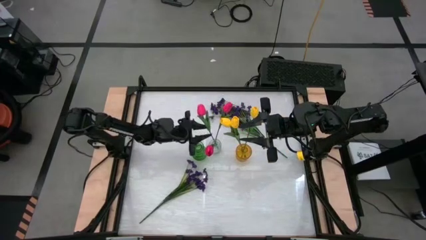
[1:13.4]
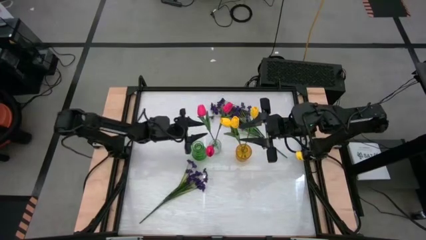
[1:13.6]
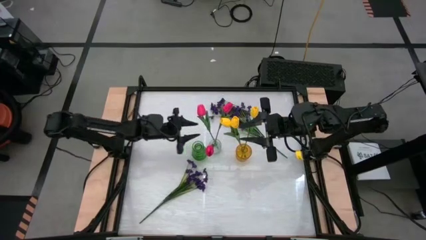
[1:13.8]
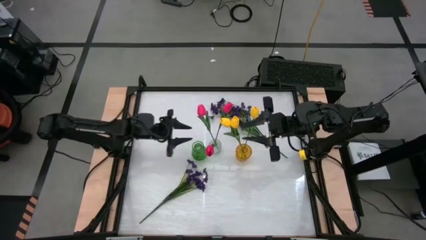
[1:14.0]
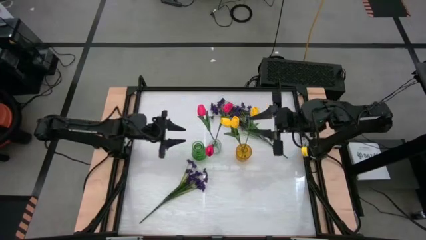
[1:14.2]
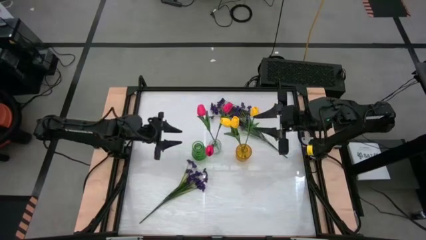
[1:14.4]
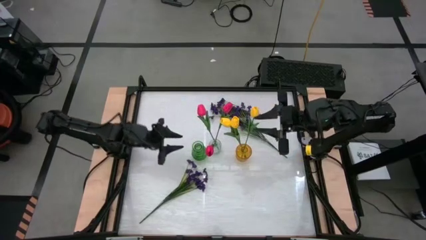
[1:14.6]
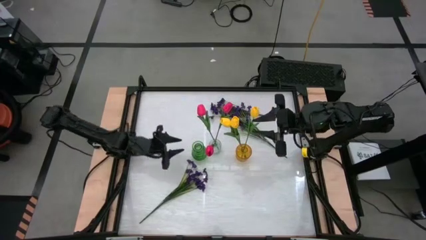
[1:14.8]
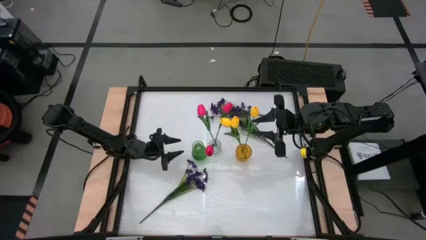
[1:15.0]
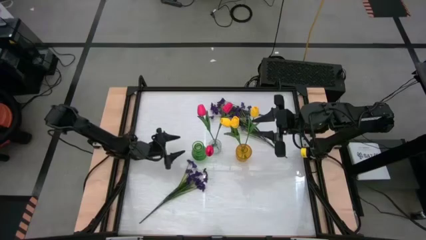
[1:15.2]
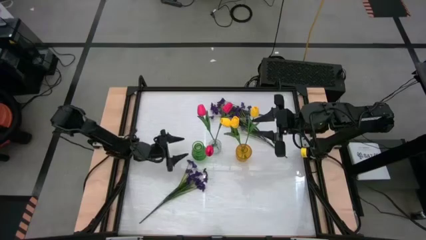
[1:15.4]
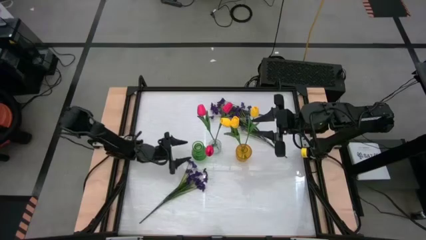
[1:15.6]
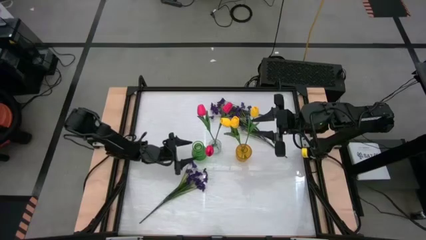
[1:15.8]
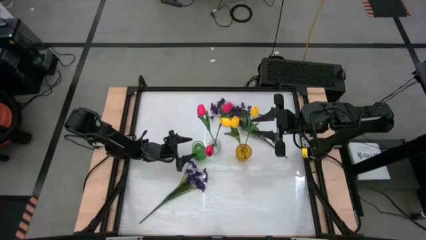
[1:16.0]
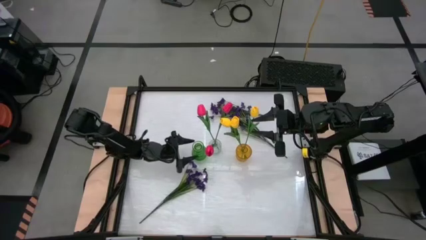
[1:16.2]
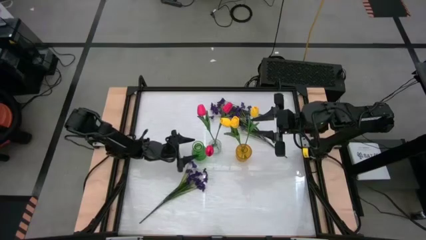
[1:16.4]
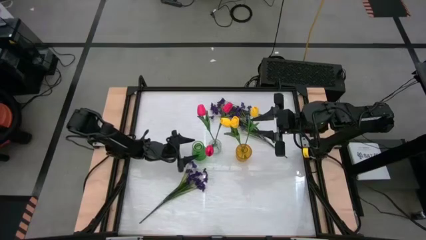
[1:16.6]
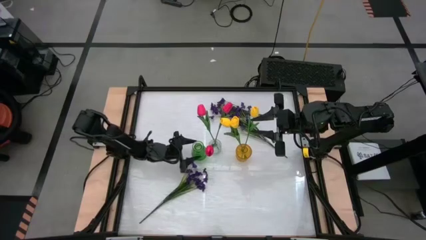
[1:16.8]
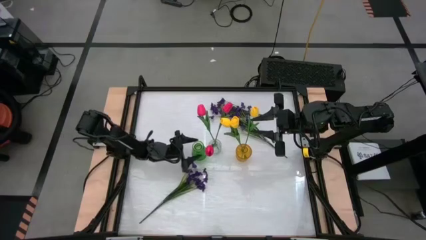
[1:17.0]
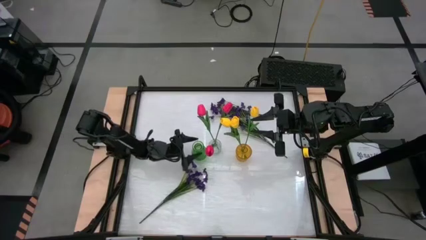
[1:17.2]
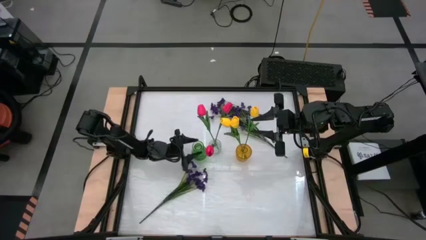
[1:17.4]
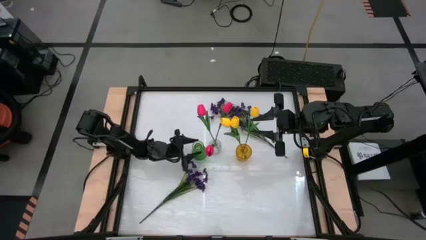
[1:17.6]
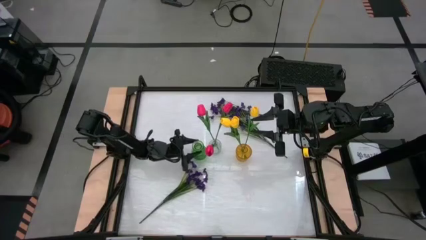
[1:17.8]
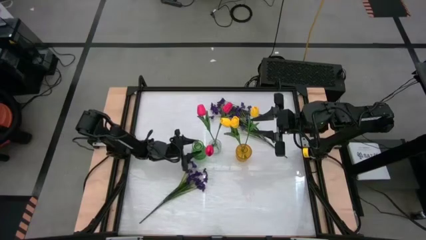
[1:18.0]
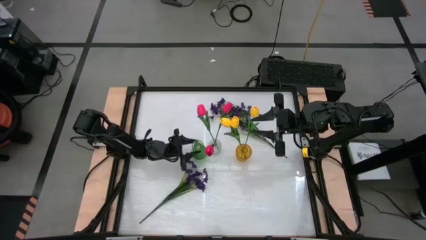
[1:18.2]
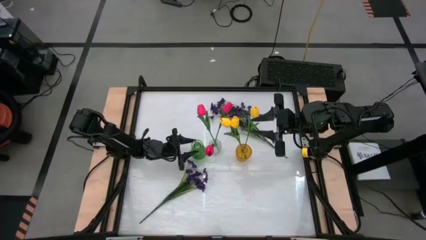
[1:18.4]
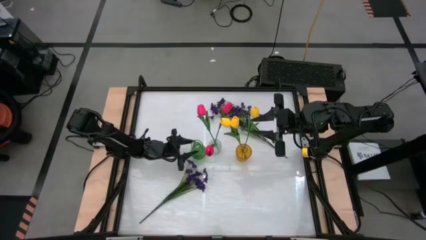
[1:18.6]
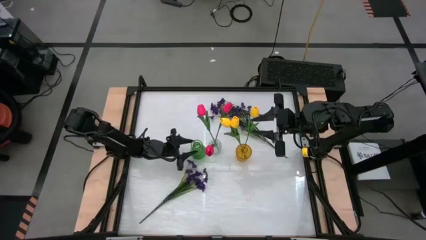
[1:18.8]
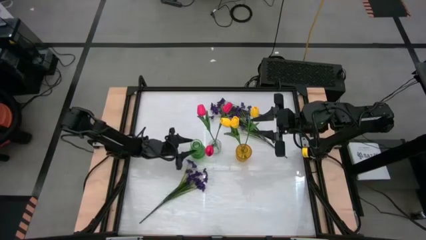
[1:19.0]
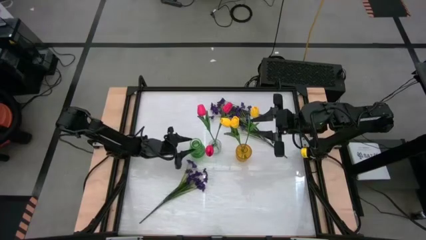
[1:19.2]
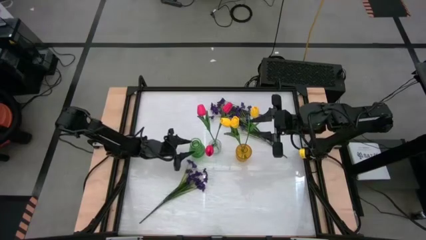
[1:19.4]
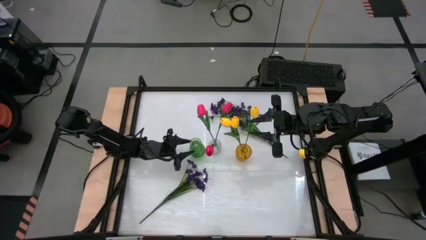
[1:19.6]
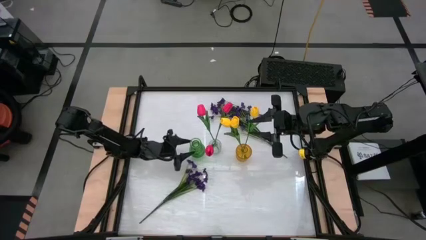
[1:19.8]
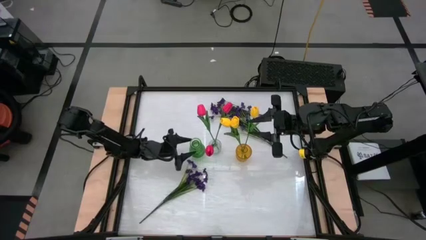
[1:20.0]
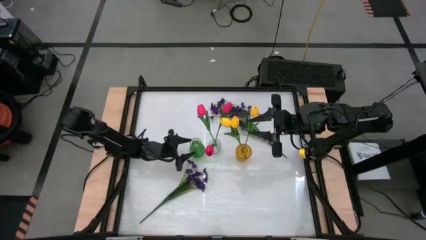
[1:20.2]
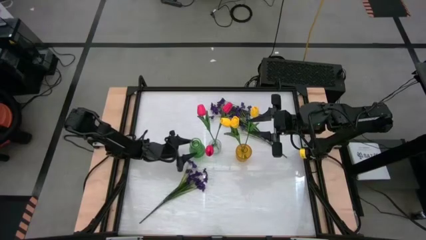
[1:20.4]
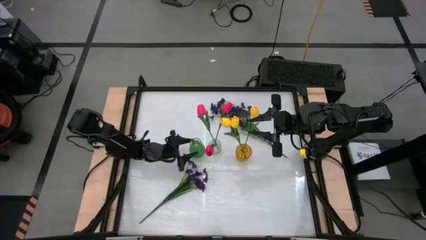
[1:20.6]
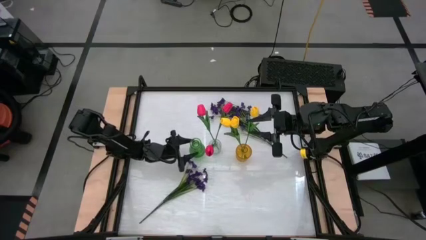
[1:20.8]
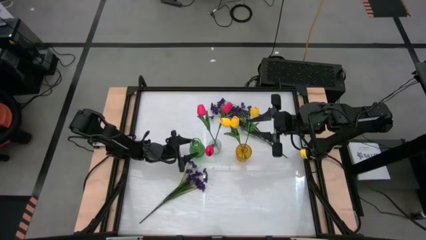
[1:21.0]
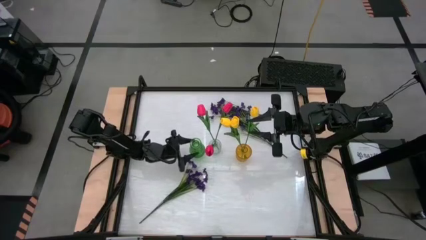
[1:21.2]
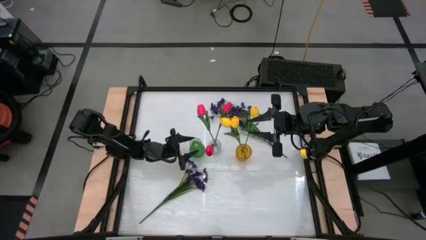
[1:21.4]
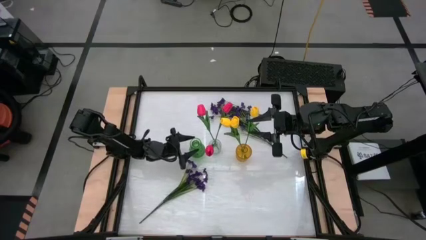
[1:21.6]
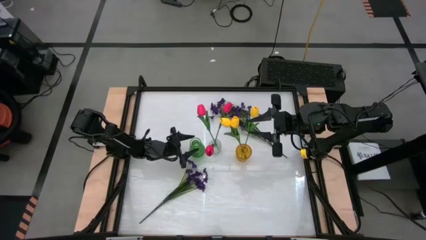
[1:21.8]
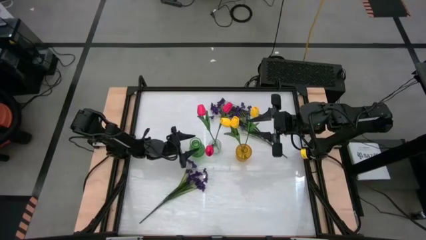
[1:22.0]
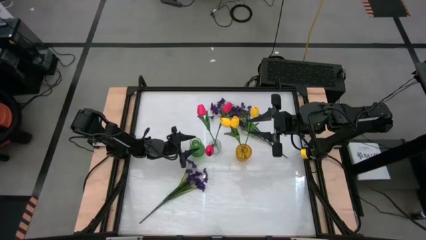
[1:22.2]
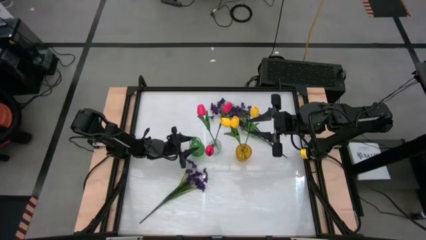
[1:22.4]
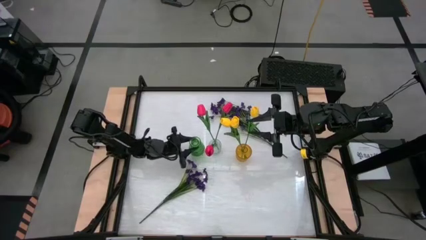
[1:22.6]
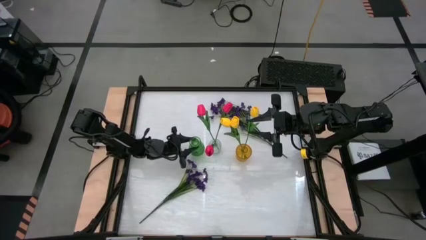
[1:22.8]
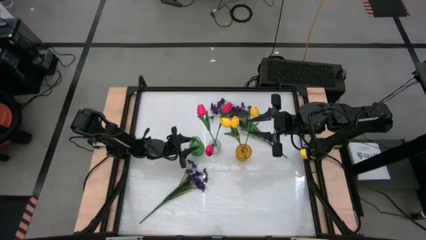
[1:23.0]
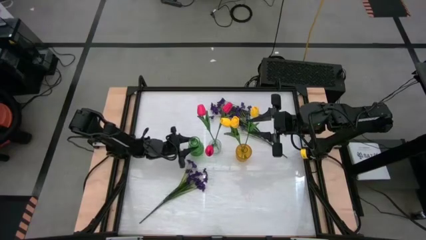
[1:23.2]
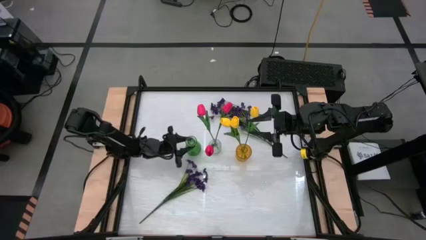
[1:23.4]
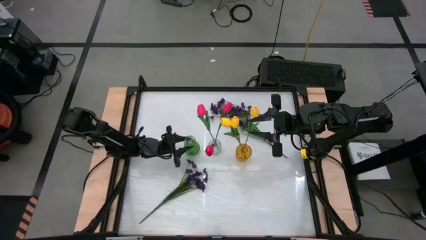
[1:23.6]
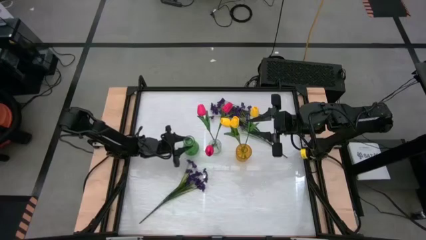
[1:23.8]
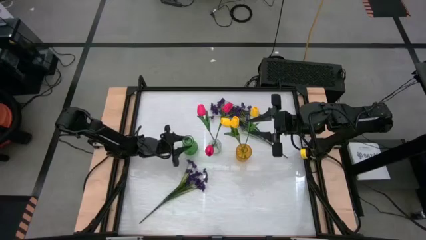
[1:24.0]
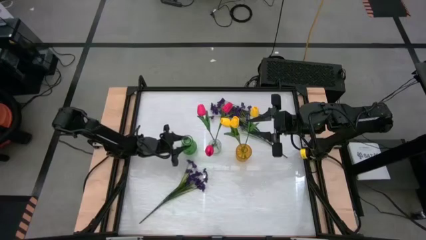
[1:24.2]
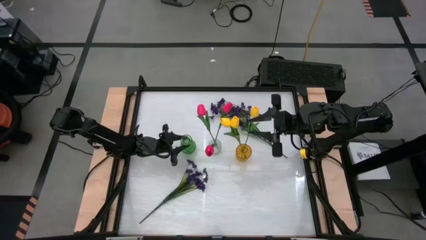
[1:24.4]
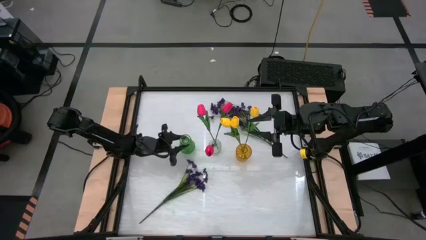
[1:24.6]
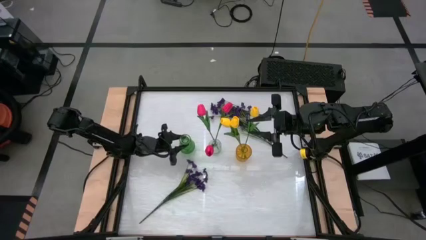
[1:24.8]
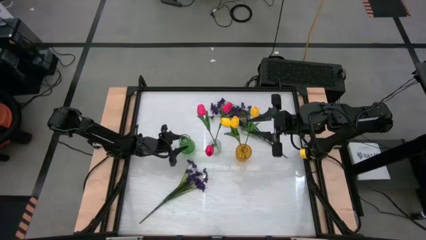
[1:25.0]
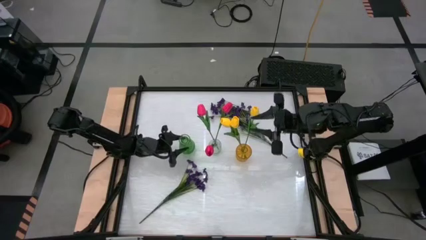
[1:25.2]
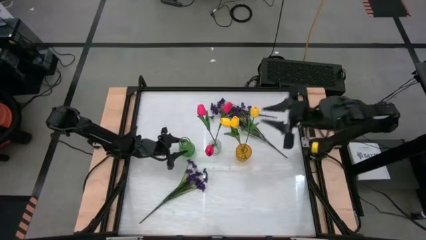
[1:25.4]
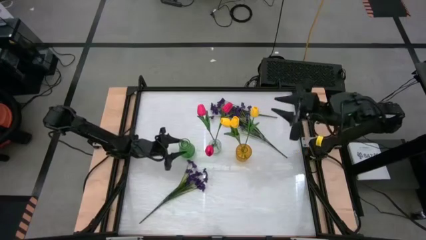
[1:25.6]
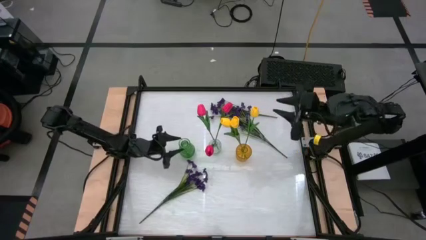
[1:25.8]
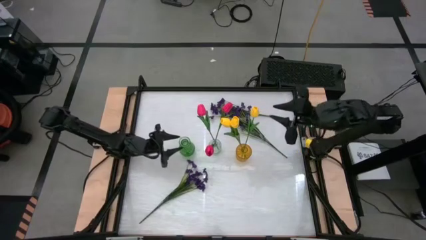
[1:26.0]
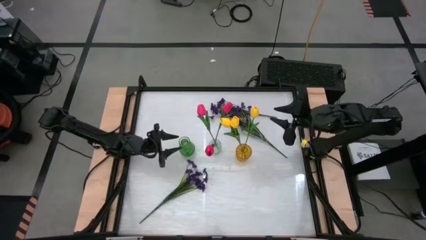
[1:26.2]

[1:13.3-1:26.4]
Task: Sort flowers into vase by color
Adjust the green vase on the table

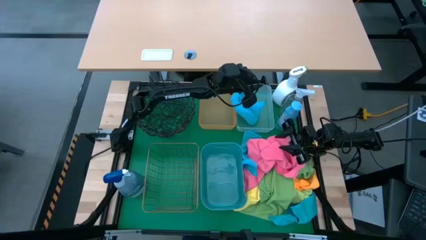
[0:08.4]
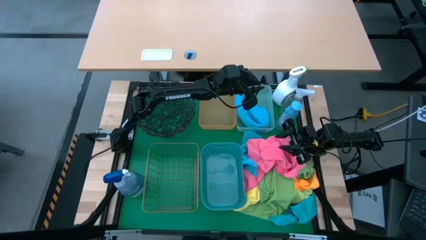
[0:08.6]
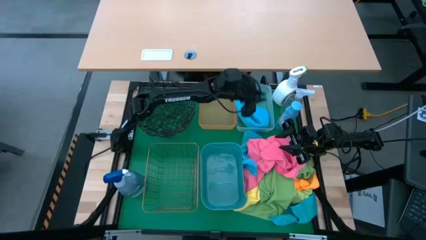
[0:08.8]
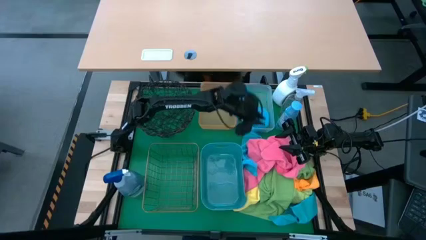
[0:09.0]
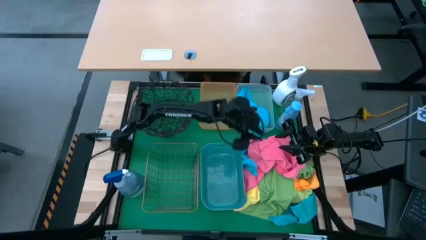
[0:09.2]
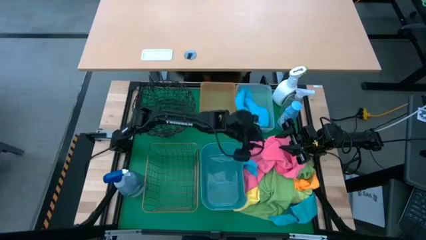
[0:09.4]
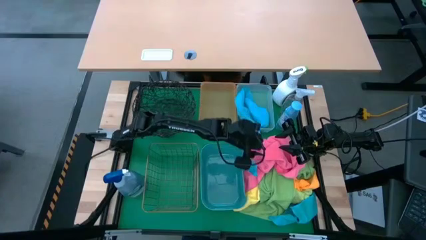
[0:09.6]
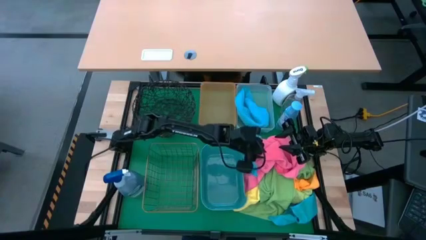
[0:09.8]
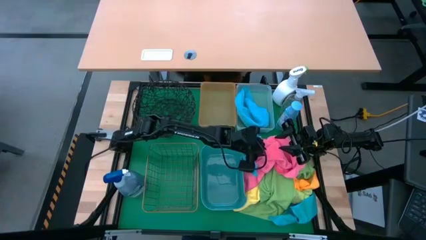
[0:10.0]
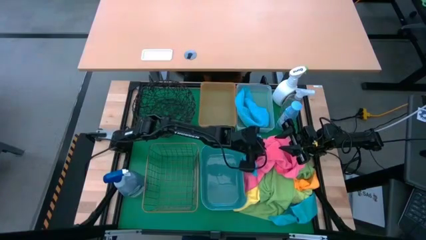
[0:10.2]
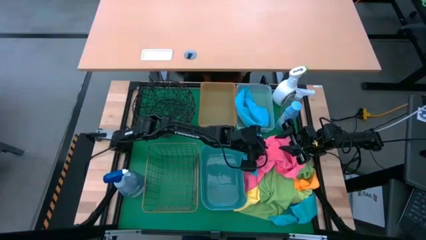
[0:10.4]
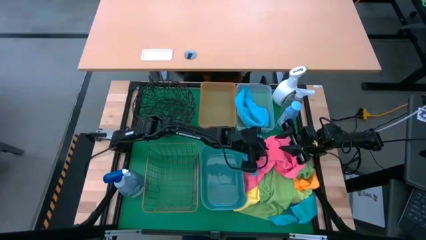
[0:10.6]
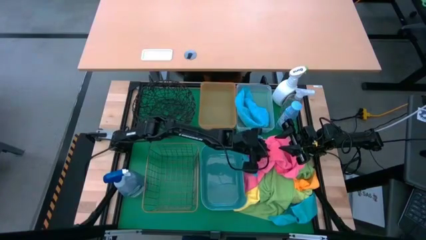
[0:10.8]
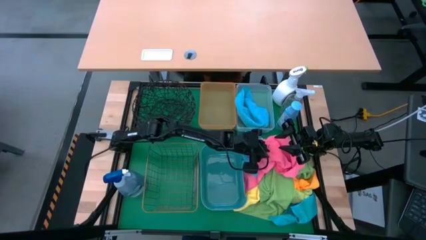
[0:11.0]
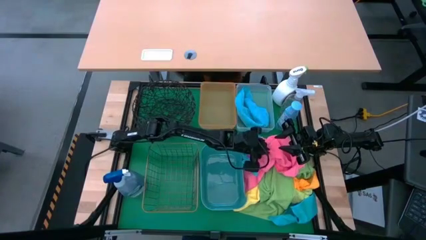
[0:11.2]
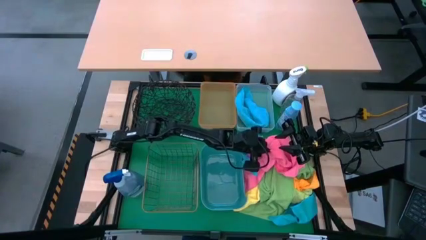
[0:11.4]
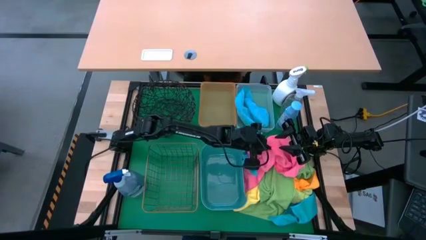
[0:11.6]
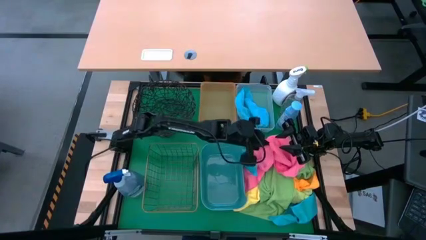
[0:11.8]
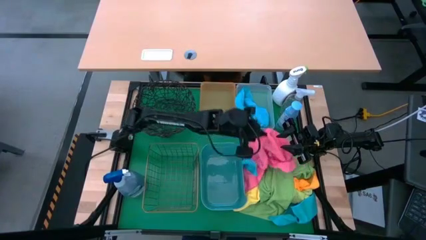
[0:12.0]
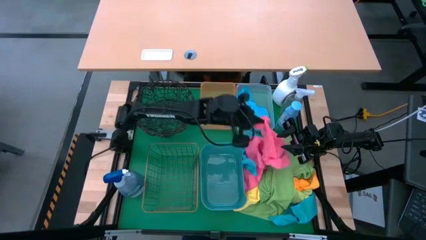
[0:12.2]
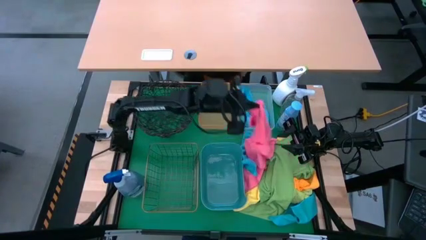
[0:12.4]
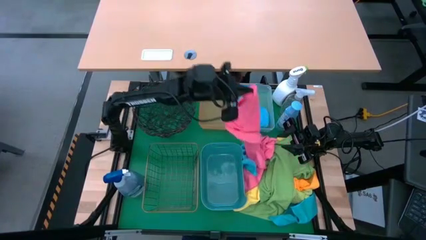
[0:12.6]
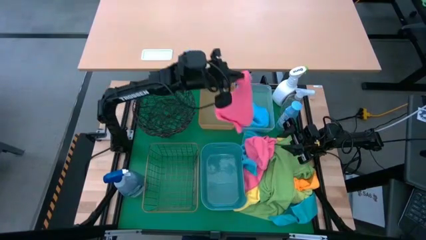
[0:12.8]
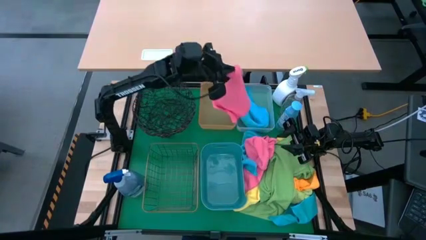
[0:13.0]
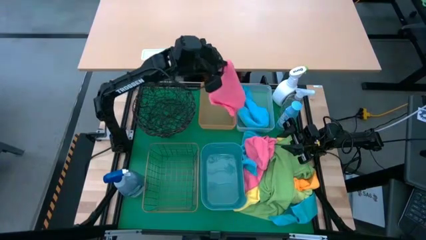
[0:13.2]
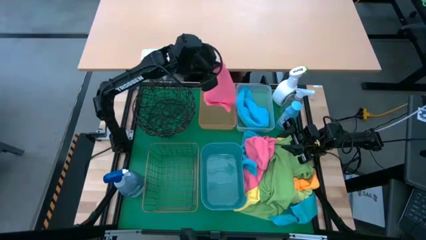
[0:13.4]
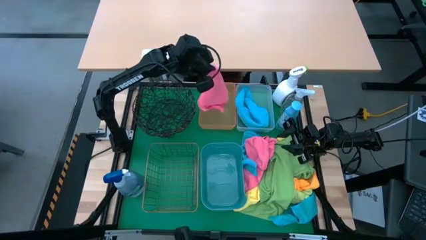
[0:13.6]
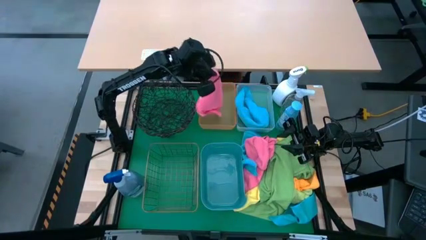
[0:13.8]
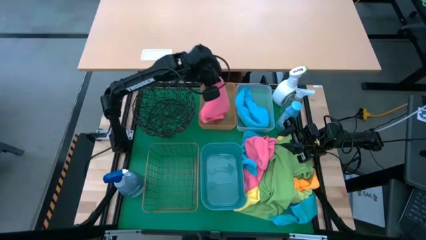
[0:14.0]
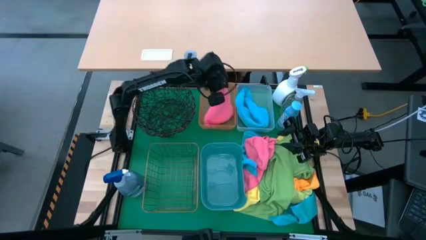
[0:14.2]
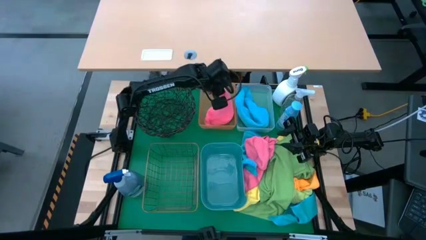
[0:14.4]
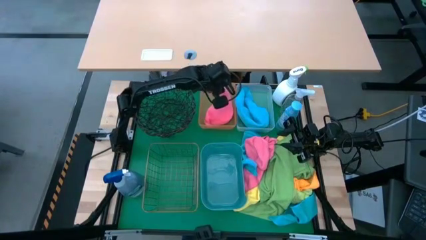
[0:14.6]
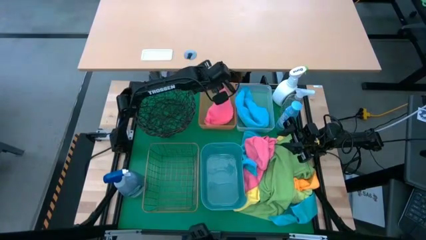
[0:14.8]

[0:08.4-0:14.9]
Task: Sort microfiber towel by color & place in baskets
Put the pink towel into the orange bin
